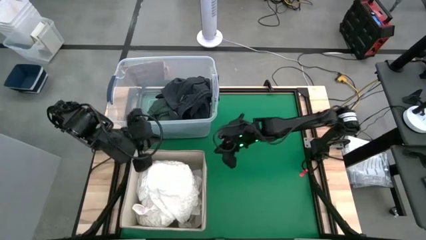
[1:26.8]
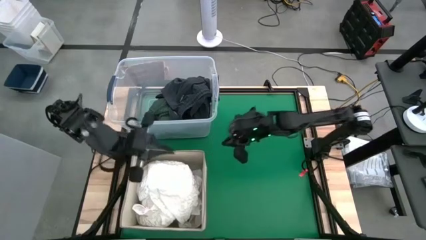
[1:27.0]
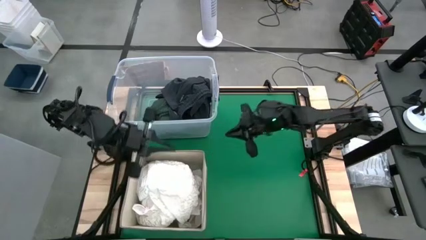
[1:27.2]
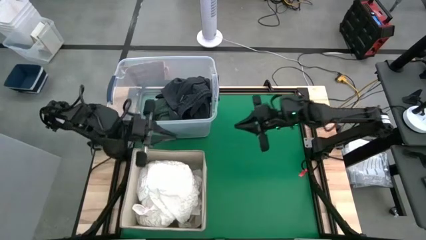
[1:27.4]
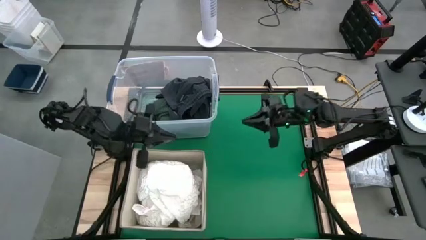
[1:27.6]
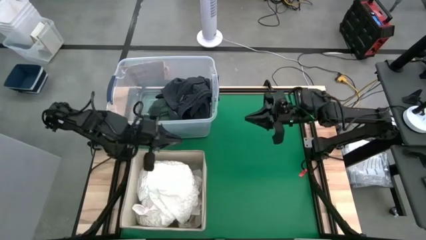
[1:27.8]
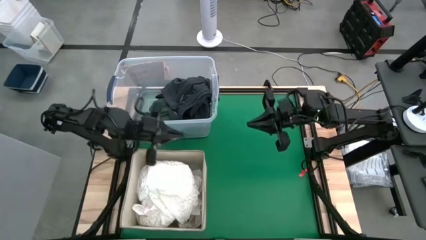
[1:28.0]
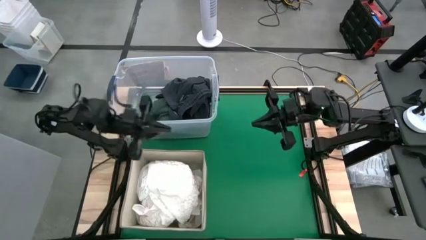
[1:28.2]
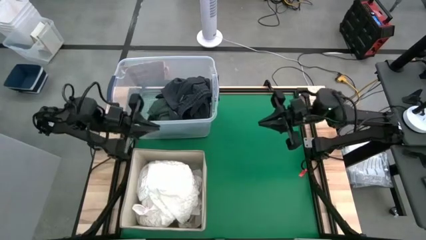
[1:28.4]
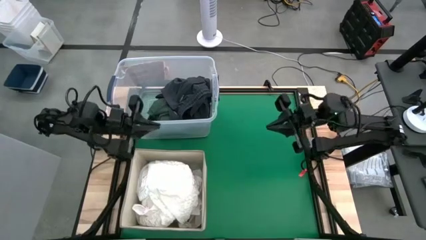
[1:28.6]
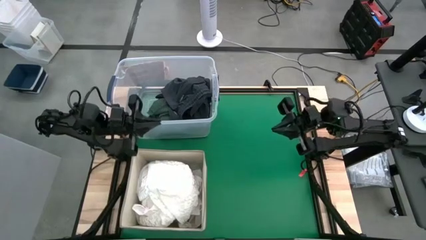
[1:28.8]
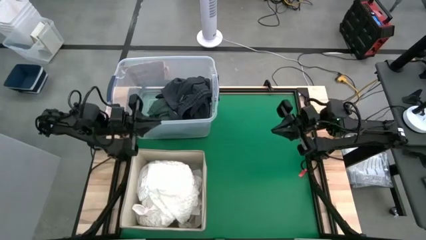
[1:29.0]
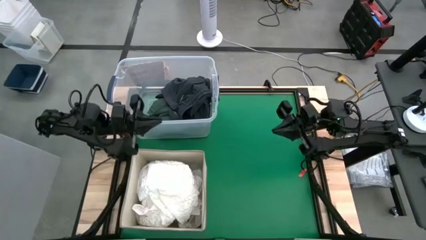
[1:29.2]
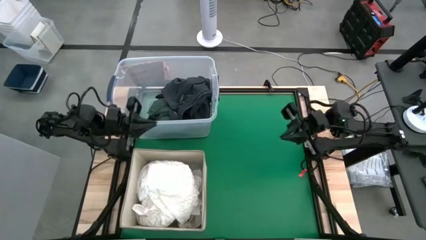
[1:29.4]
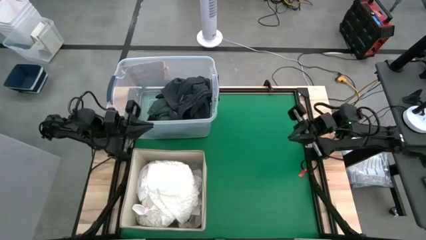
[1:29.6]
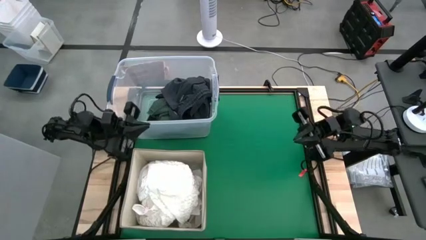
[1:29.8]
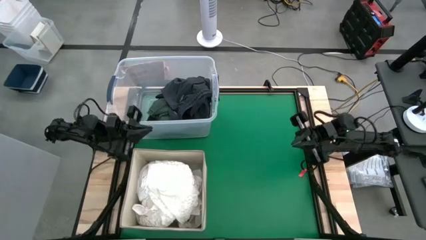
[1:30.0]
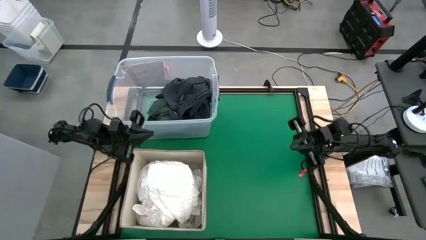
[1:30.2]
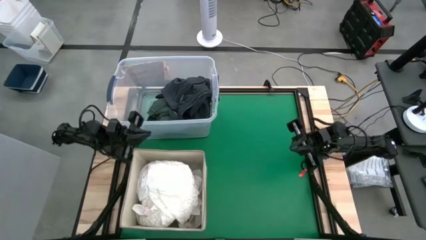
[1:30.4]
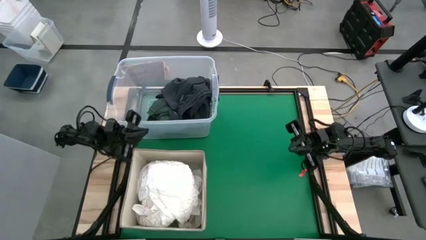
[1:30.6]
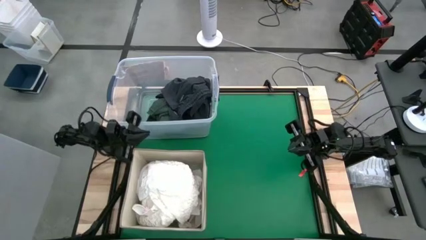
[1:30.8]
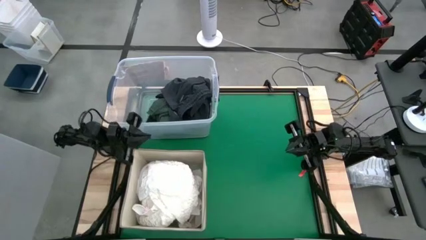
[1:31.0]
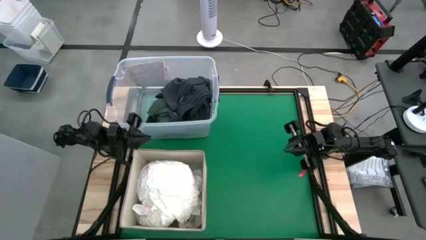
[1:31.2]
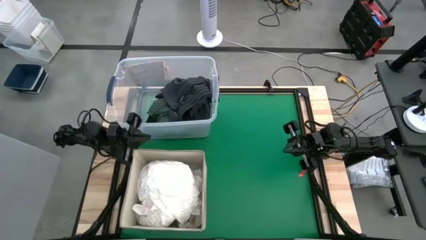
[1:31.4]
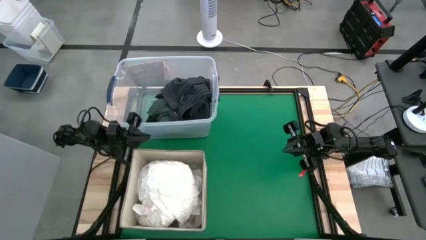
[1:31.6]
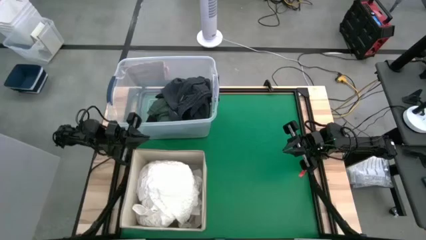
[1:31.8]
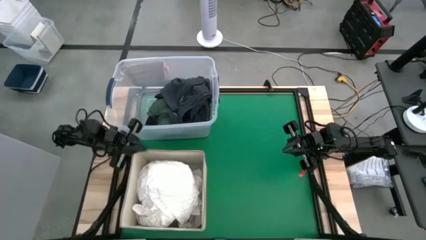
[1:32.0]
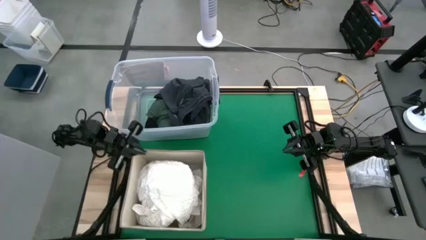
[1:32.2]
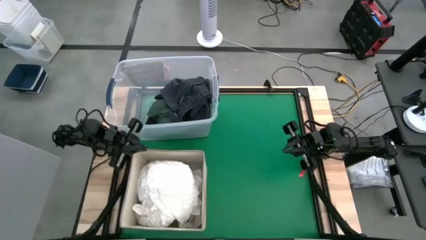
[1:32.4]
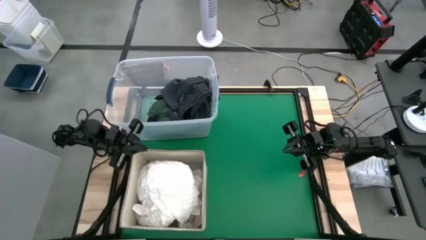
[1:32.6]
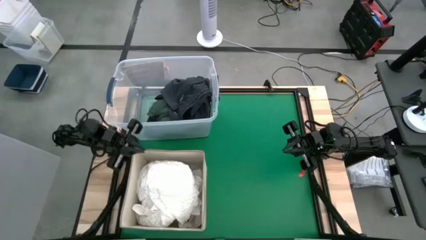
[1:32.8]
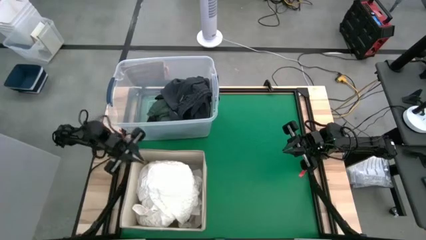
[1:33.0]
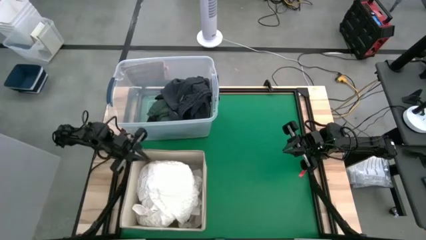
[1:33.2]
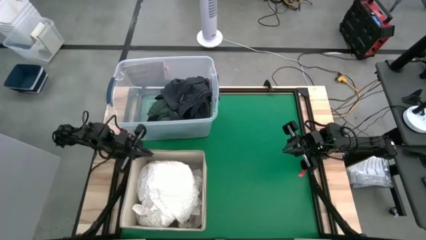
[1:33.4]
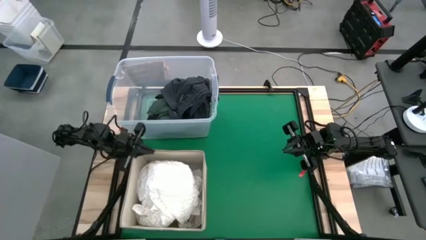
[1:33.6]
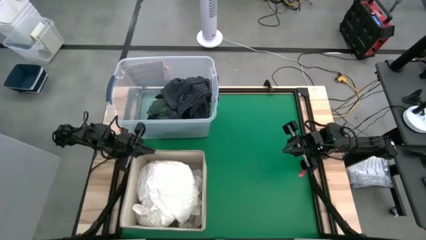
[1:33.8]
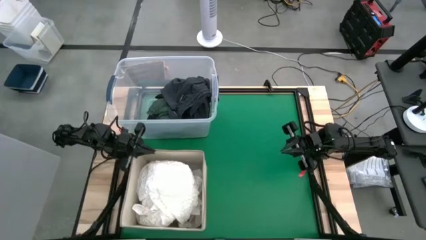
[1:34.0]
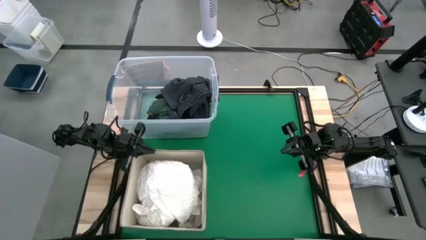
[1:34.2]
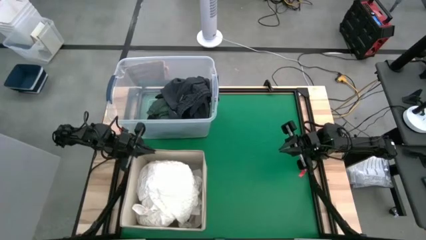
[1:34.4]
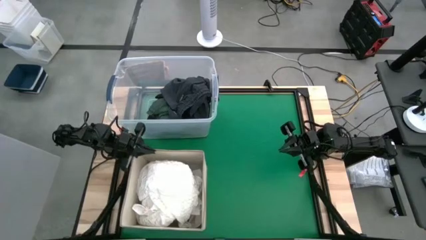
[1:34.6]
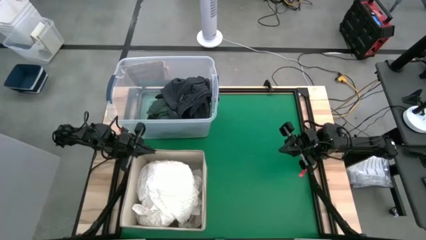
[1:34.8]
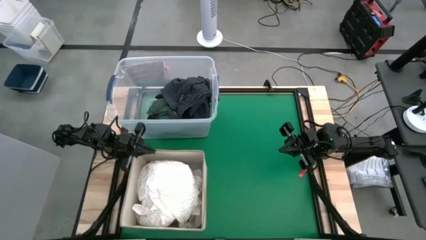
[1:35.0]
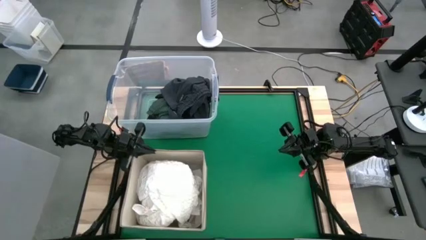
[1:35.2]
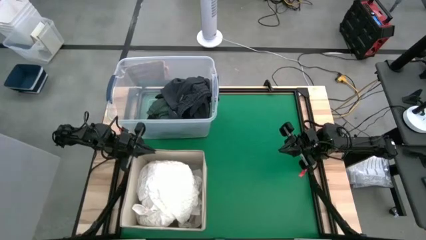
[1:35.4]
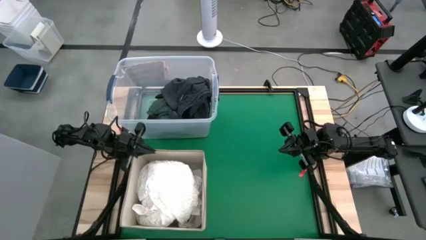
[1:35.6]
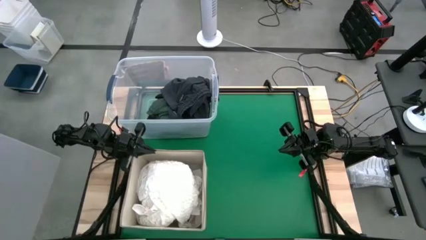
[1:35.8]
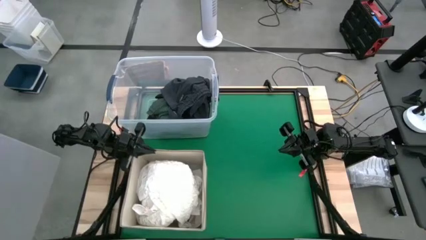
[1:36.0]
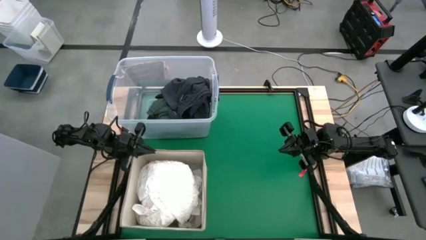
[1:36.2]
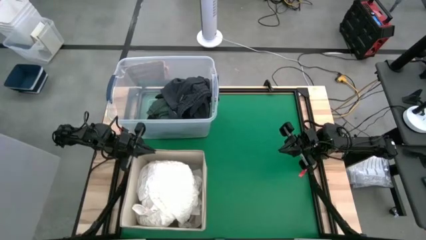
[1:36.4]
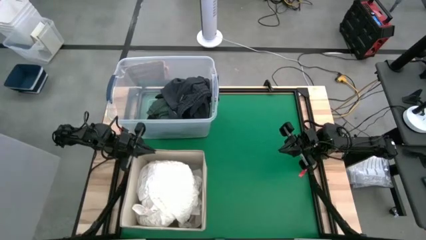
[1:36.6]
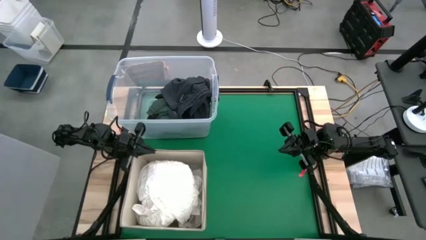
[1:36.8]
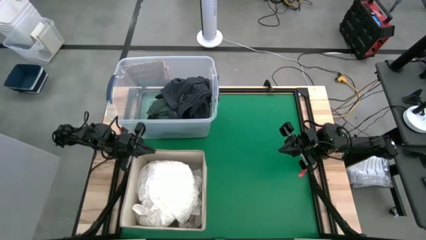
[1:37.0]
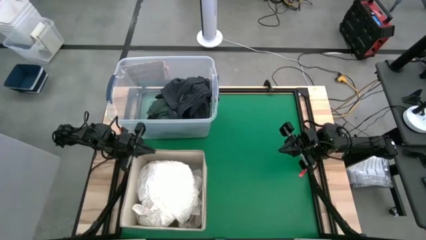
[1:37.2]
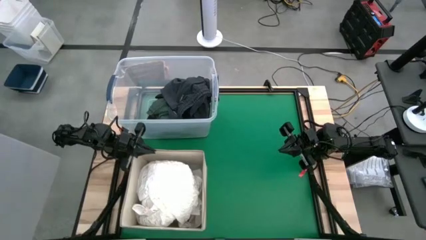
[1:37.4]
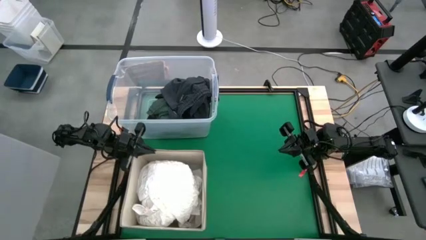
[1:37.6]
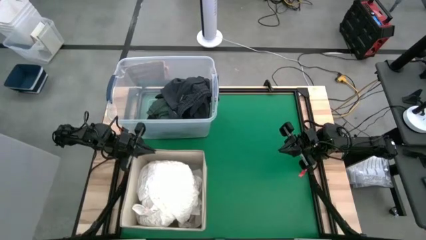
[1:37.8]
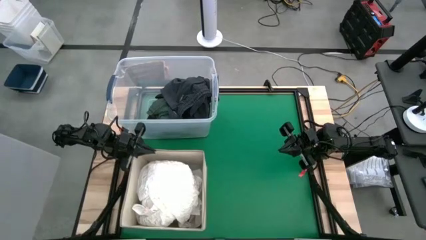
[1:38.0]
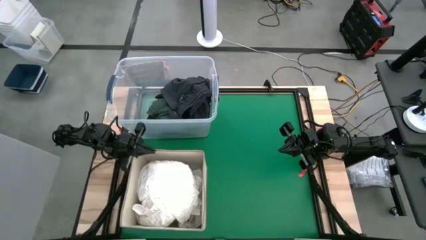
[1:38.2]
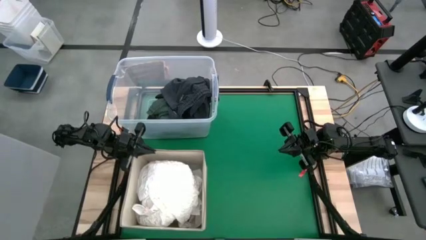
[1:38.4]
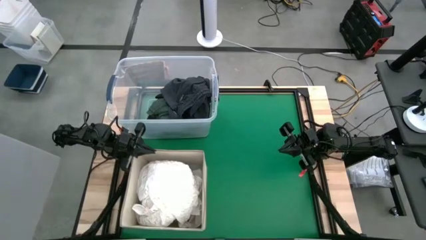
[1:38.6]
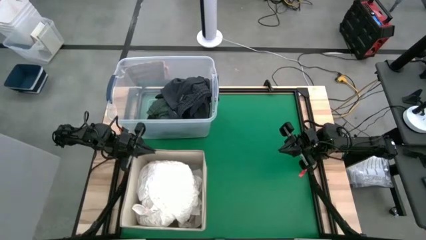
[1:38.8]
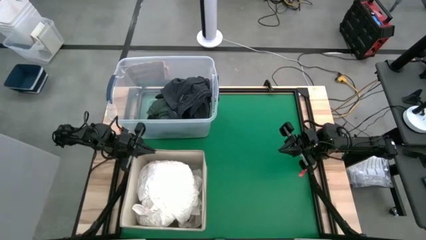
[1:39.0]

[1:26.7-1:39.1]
Task: Sort clothes
Return to Home Position

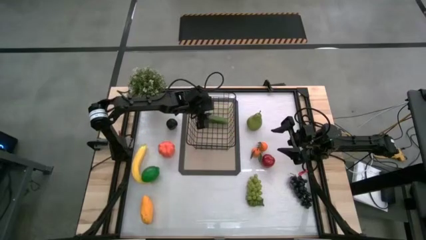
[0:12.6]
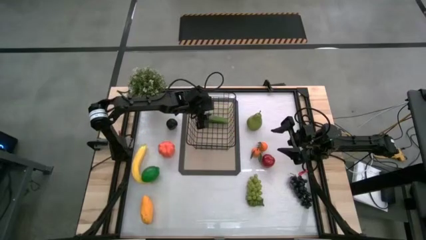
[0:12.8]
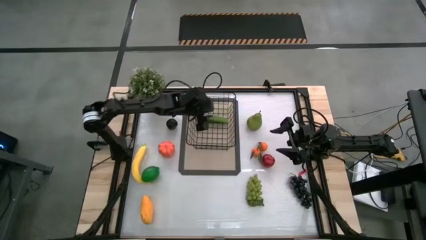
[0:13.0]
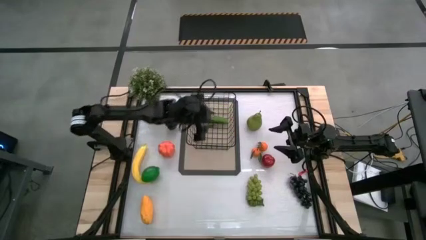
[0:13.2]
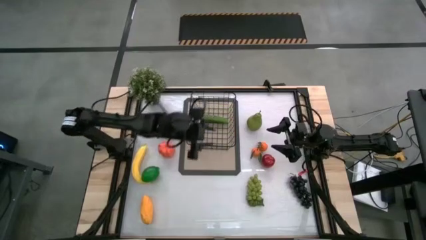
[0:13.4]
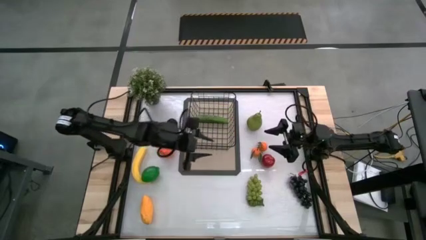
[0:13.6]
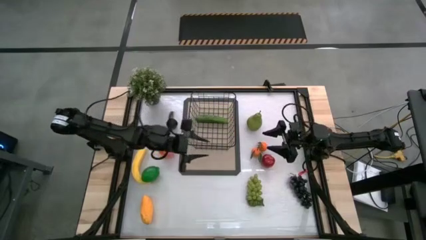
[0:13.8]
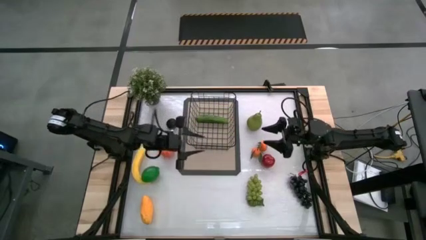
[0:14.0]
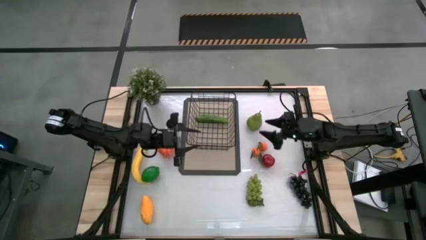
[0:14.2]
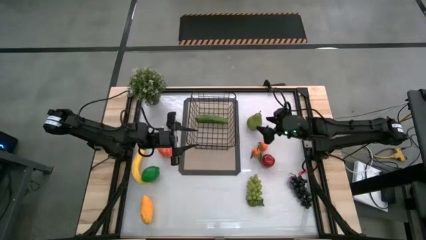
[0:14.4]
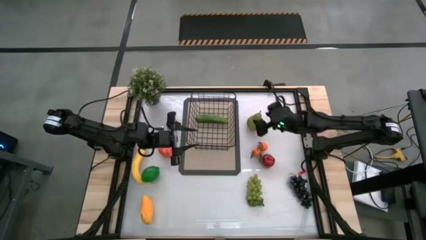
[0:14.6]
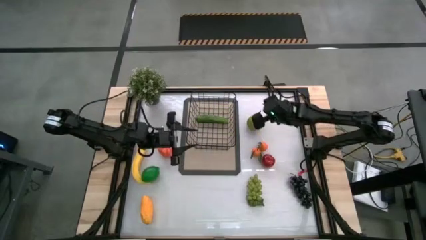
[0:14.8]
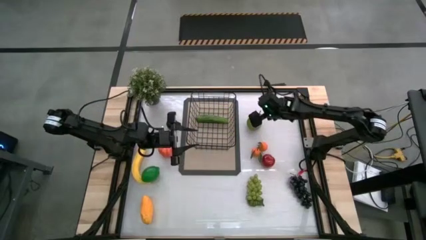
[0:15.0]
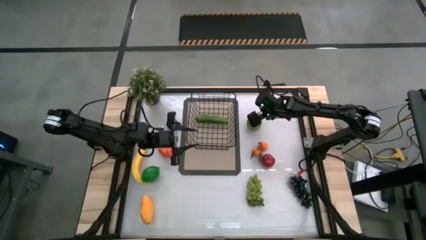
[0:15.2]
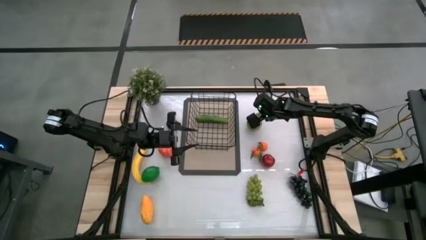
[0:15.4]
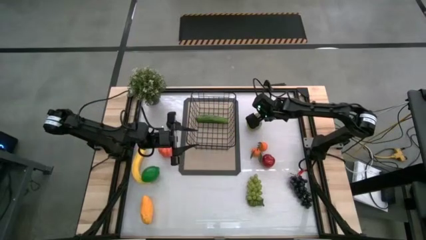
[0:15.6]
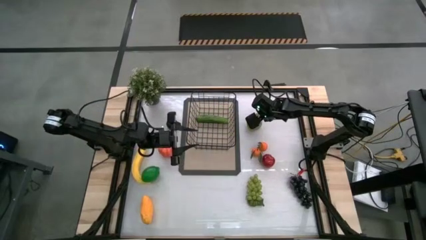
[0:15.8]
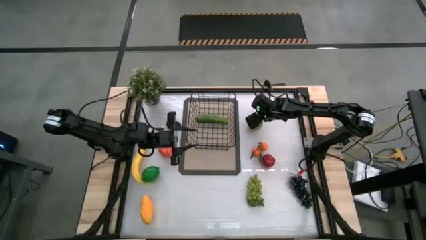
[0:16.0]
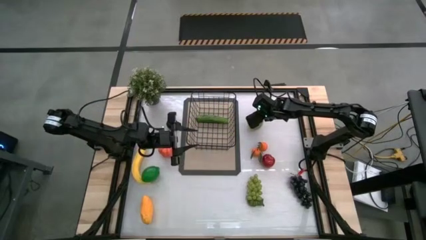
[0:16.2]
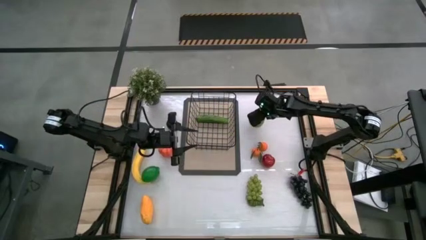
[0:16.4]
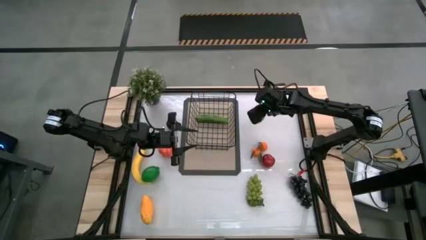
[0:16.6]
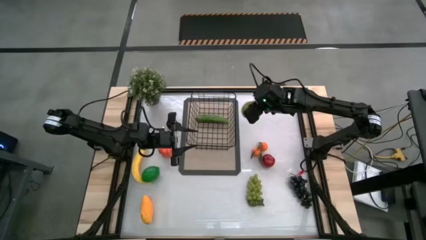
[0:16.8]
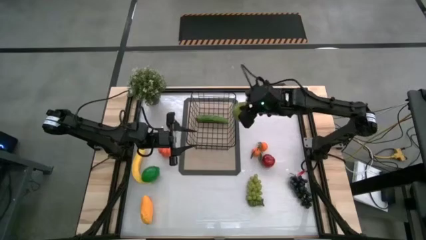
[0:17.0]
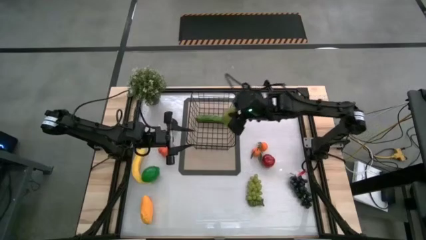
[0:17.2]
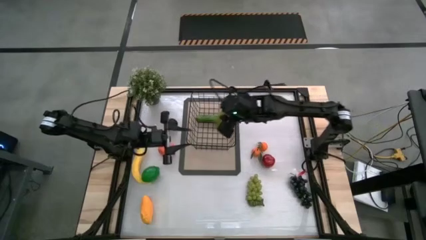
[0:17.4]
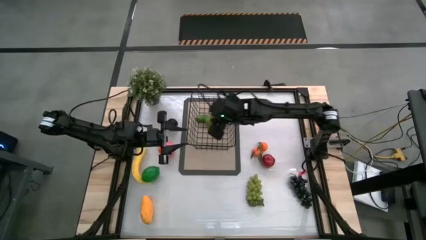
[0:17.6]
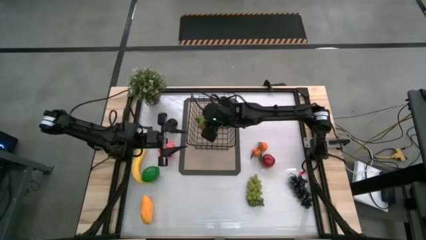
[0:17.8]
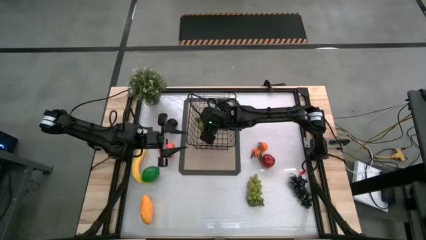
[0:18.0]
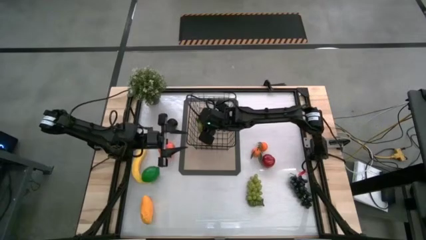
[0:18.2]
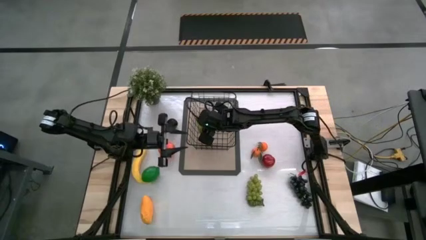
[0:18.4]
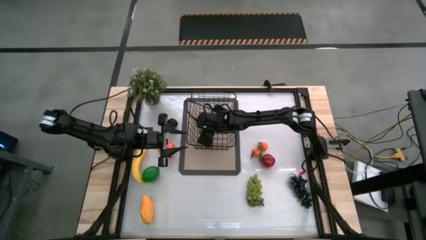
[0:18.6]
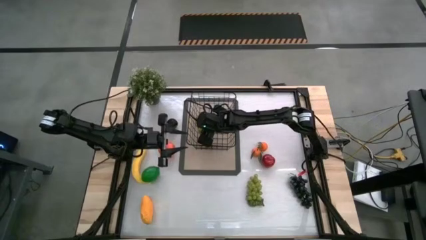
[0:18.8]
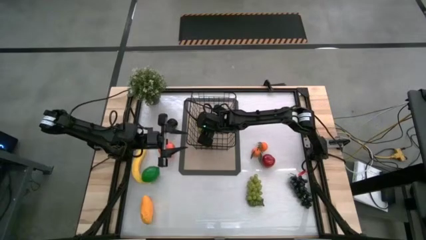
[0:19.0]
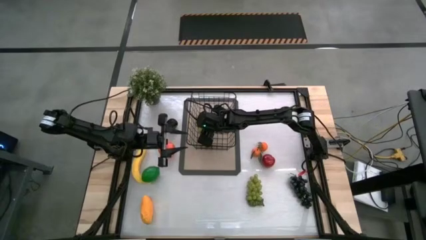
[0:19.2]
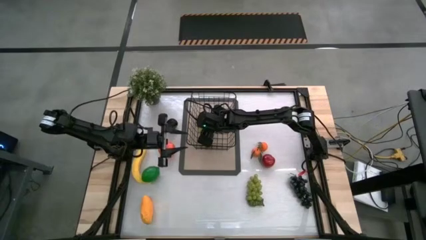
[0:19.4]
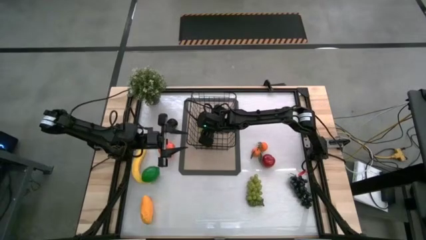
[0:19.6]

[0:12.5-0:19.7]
Task: Build produce basket
Put the pear into the black wire basket
